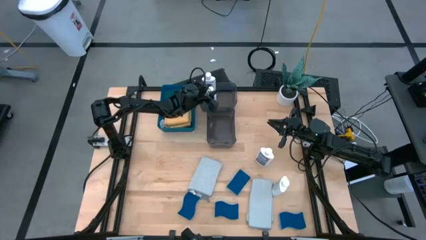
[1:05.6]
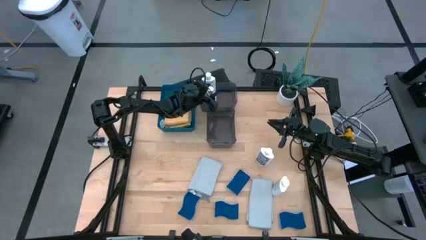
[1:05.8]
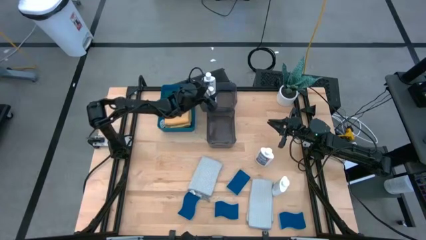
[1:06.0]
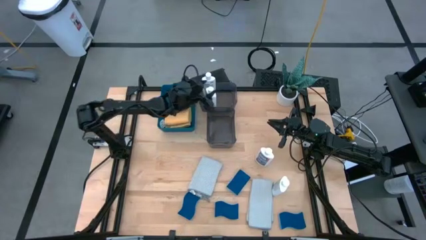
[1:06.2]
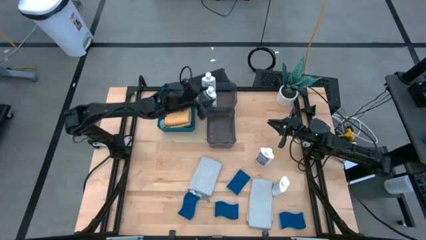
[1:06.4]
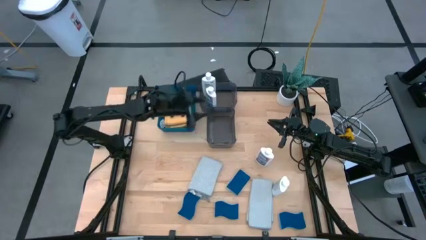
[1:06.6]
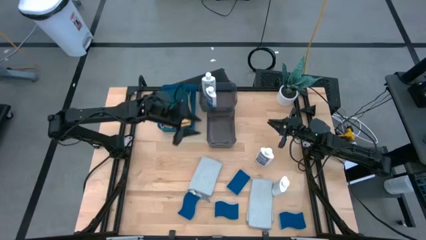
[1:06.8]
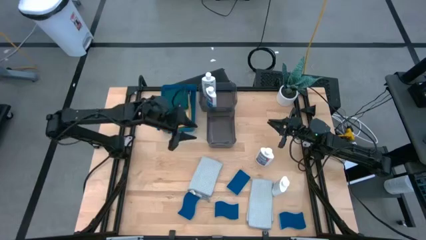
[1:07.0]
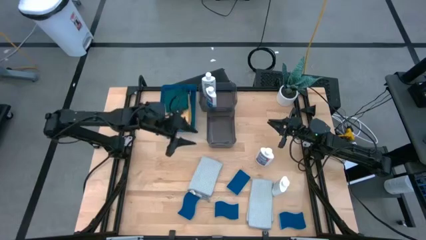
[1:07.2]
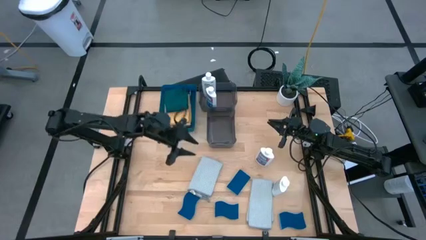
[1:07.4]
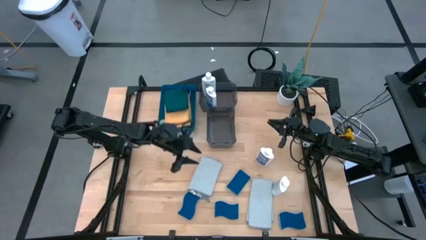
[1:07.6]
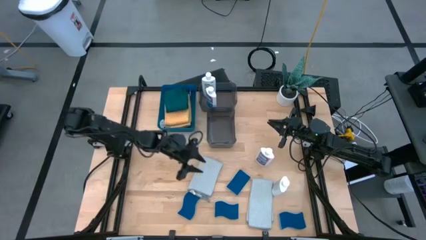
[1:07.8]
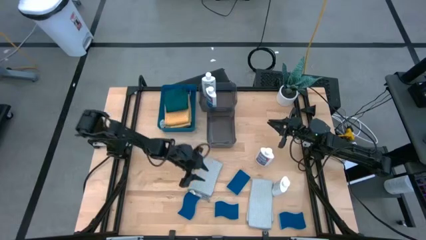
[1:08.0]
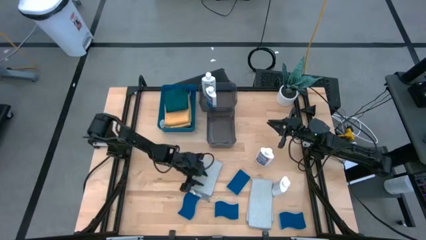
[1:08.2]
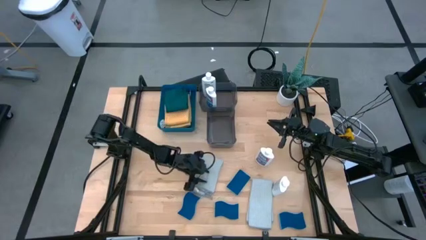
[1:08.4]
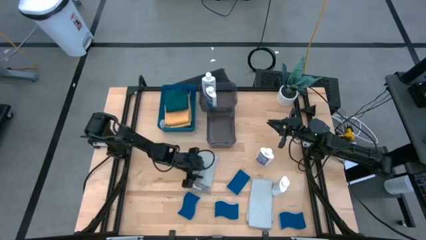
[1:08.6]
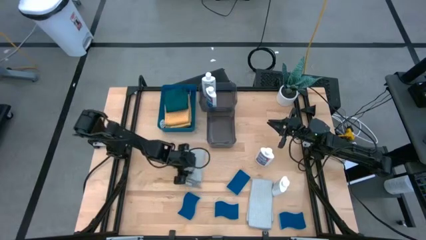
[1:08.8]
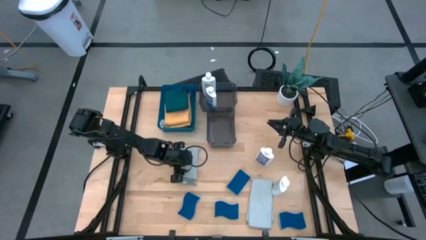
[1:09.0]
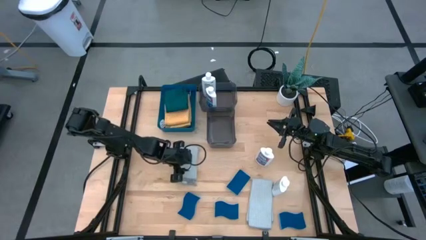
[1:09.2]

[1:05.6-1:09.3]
Task: Pick & Place Kitchen Items
Adjust the left gray microfiber towel on the table

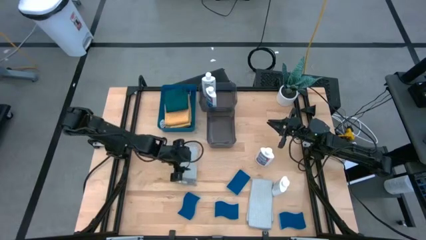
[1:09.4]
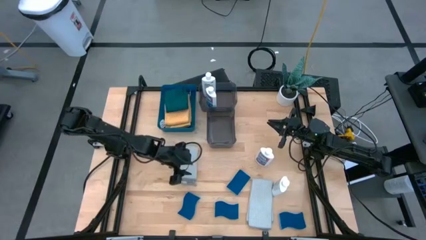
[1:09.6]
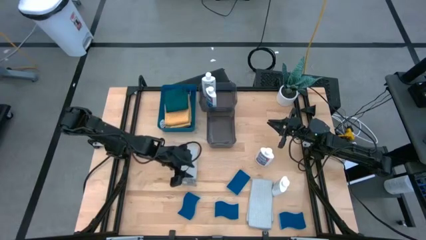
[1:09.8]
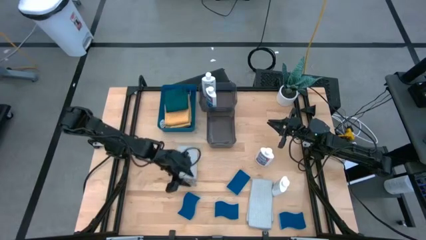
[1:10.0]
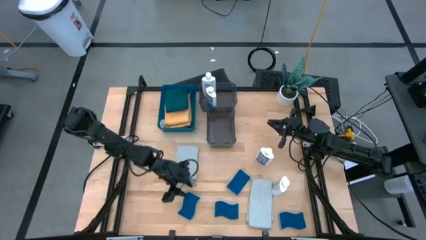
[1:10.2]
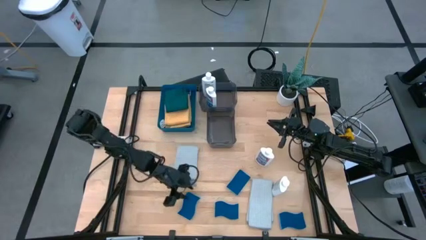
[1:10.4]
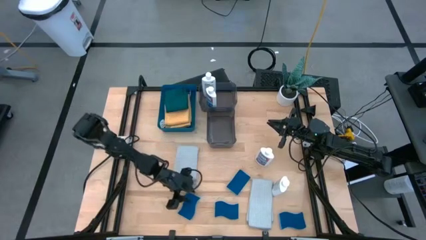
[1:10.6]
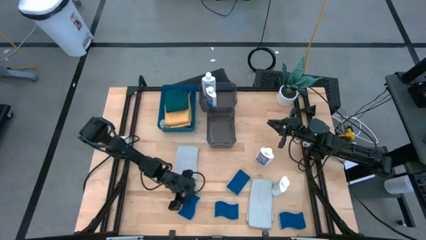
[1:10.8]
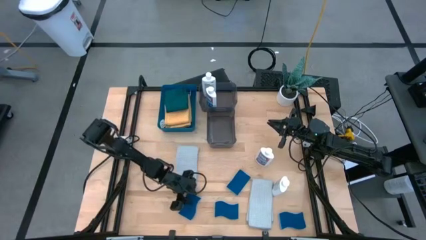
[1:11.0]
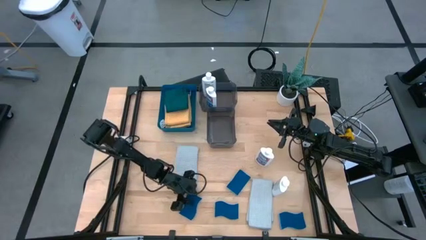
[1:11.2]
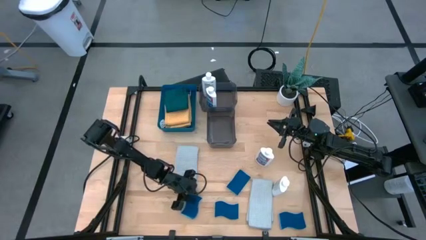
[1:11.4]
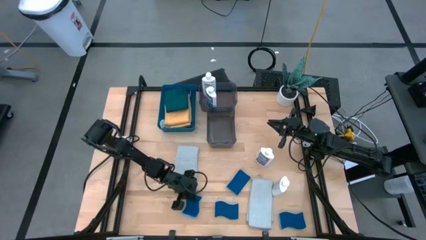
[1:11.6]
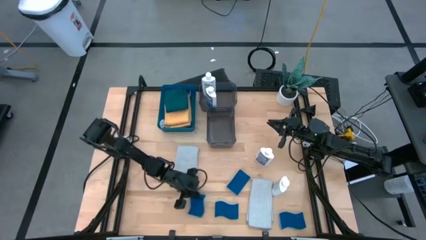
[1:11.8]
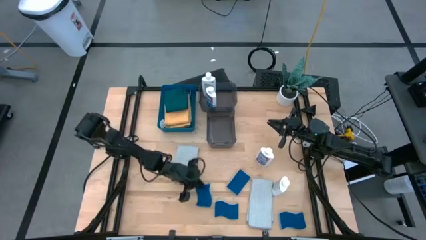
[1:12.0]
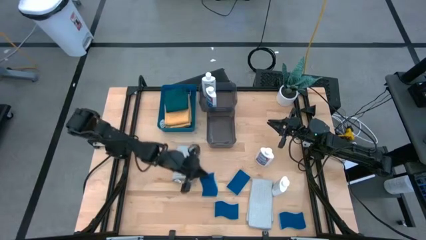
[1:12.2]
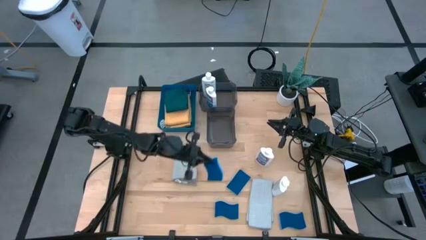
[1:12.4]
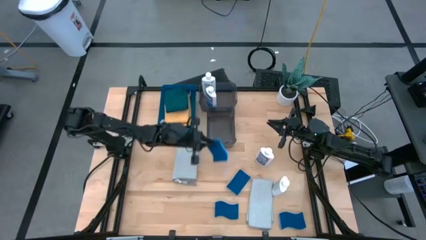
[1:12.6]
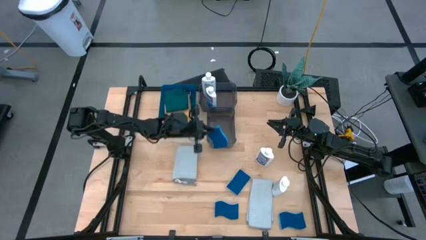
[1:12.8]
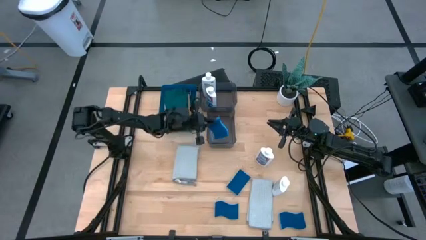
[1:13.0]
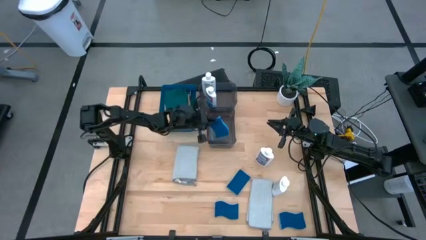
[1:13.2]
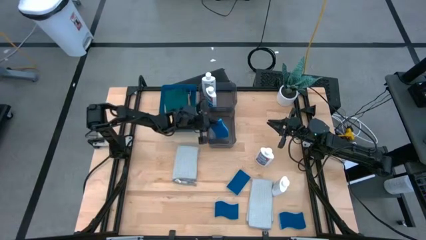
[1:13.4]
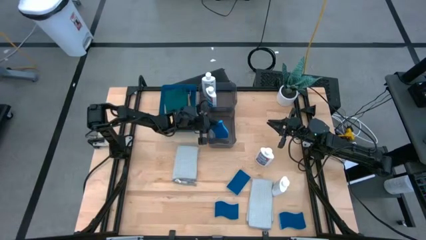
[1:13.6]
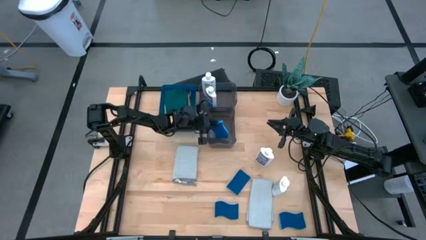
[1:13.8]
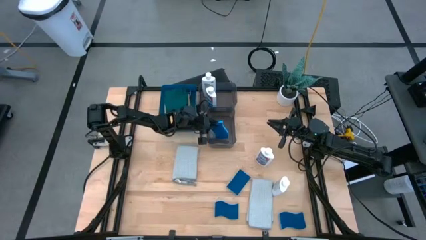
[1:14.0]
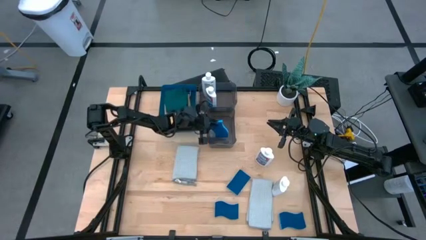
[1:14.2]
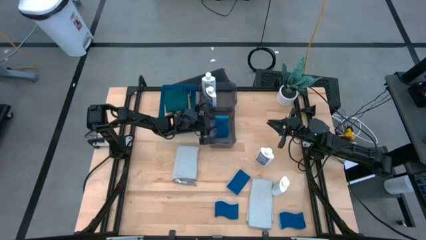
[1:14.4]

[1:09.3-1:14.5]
Put the blue sponge into the bottom black bin

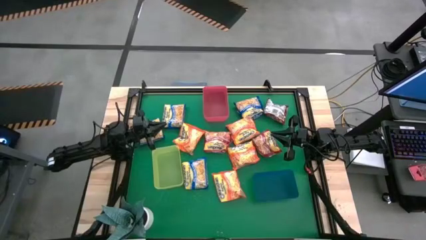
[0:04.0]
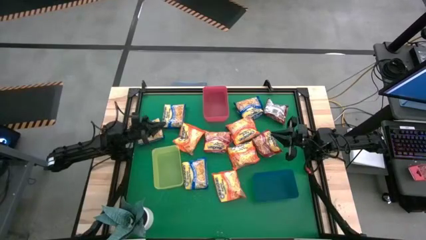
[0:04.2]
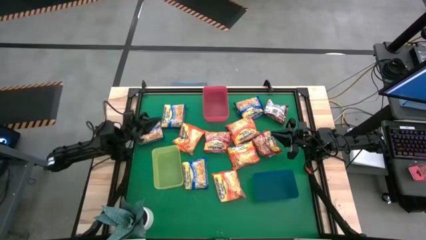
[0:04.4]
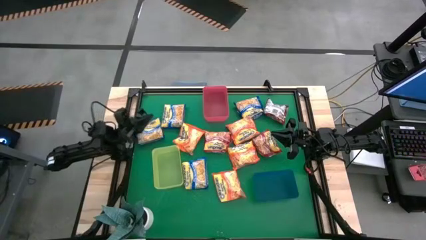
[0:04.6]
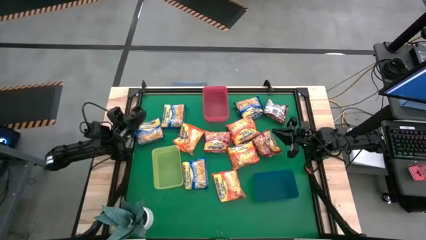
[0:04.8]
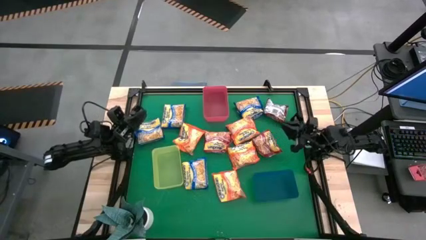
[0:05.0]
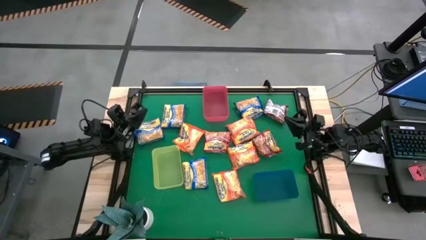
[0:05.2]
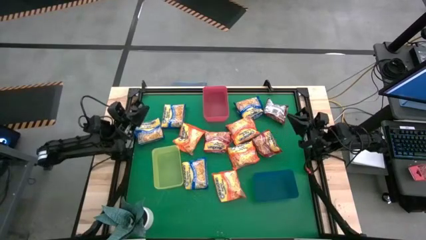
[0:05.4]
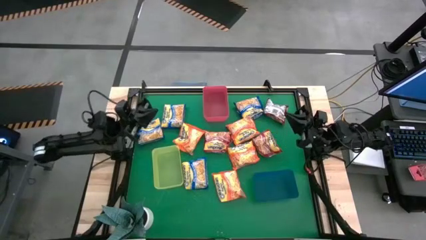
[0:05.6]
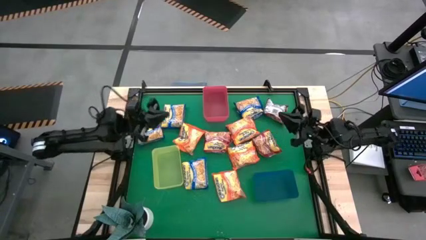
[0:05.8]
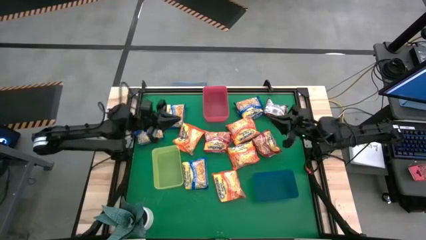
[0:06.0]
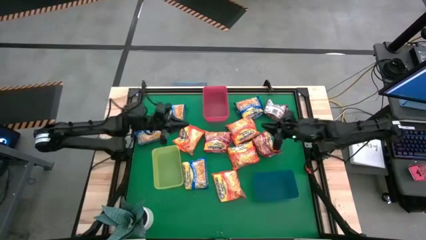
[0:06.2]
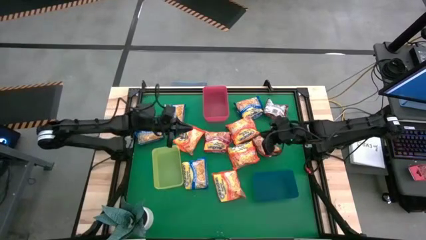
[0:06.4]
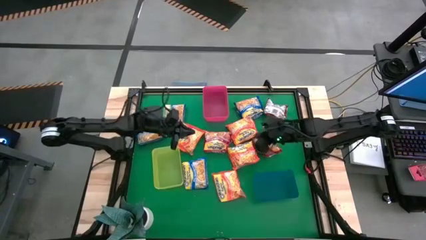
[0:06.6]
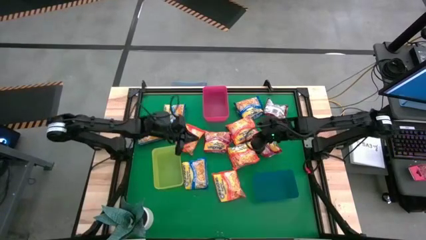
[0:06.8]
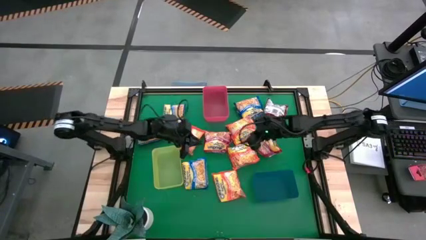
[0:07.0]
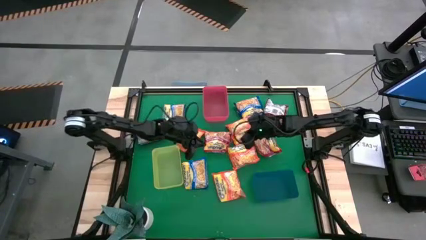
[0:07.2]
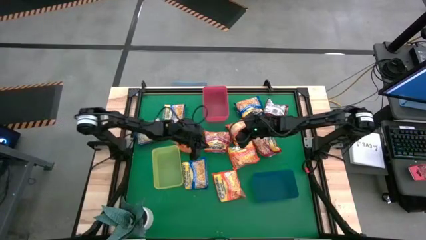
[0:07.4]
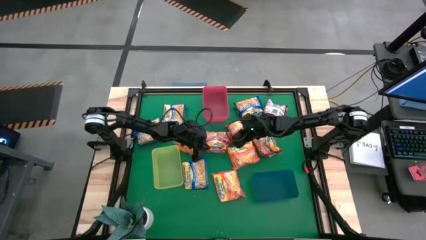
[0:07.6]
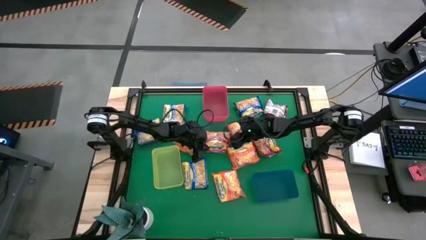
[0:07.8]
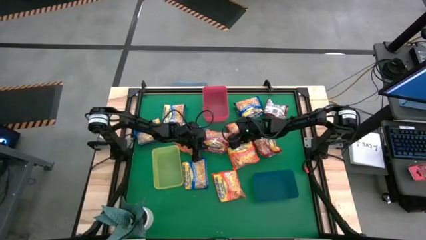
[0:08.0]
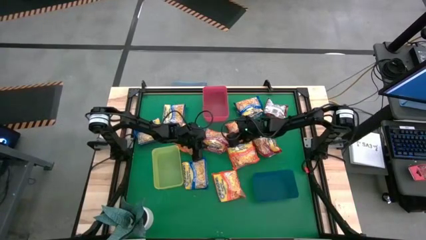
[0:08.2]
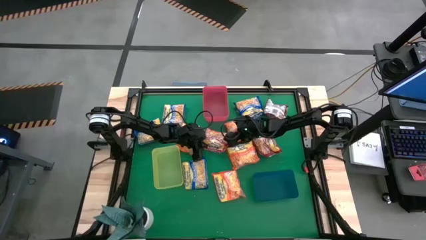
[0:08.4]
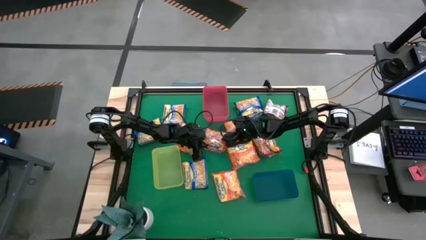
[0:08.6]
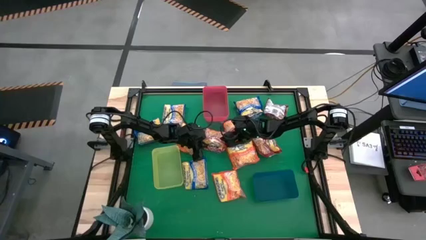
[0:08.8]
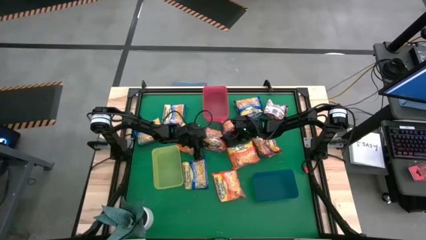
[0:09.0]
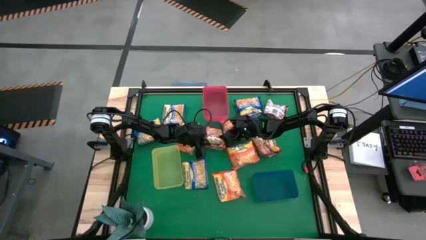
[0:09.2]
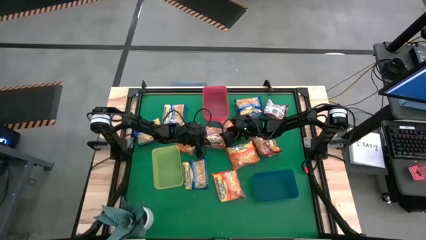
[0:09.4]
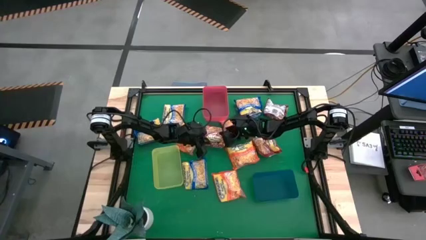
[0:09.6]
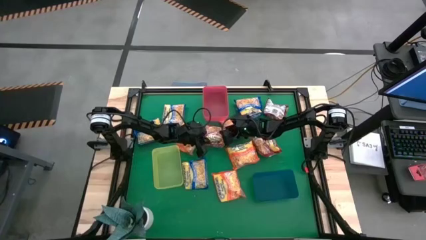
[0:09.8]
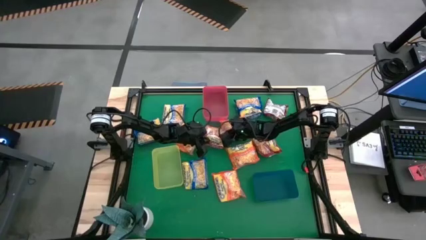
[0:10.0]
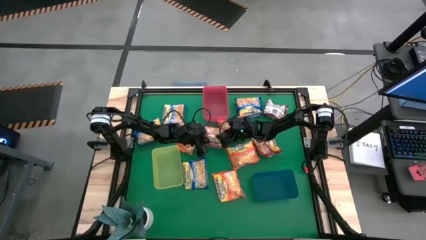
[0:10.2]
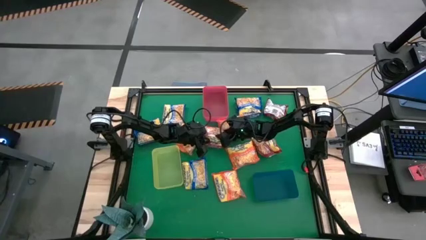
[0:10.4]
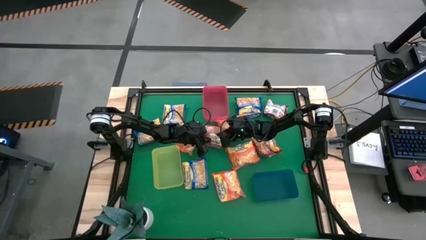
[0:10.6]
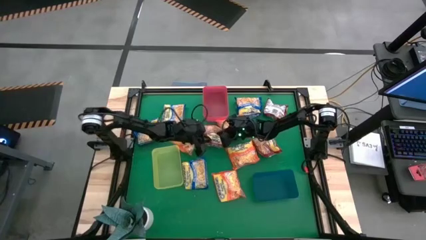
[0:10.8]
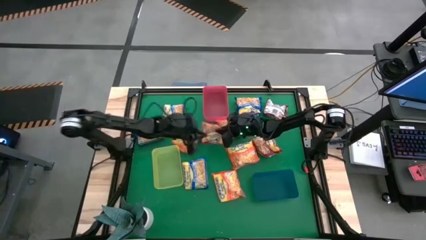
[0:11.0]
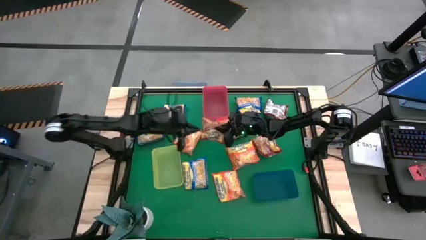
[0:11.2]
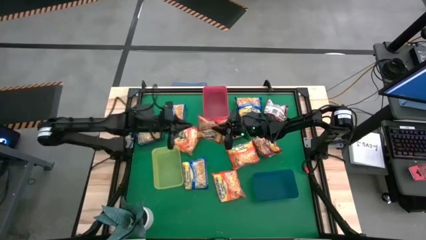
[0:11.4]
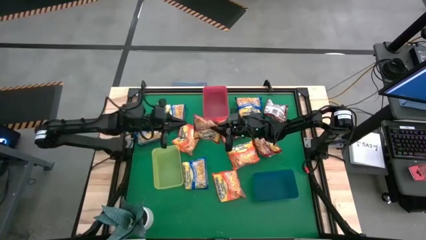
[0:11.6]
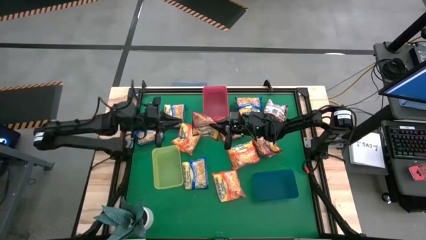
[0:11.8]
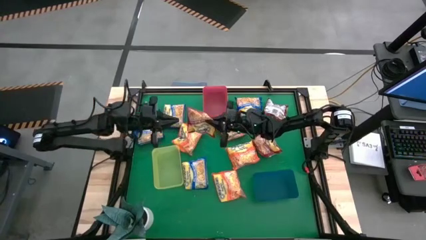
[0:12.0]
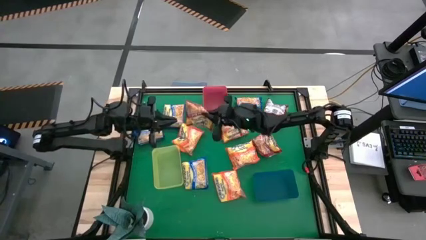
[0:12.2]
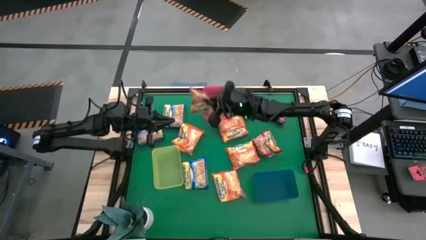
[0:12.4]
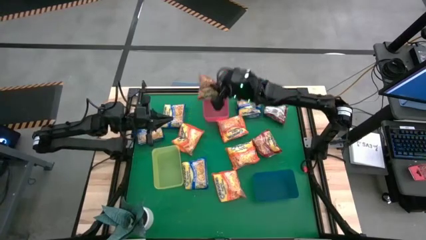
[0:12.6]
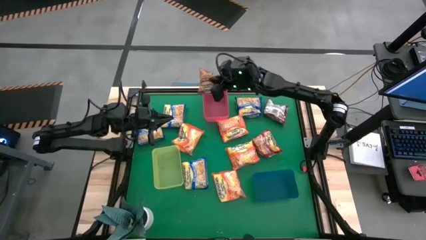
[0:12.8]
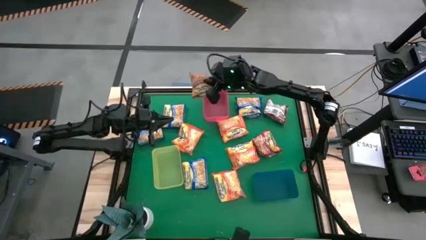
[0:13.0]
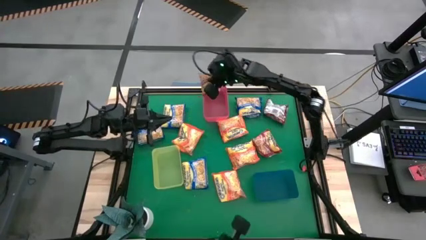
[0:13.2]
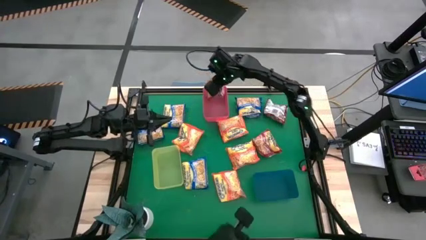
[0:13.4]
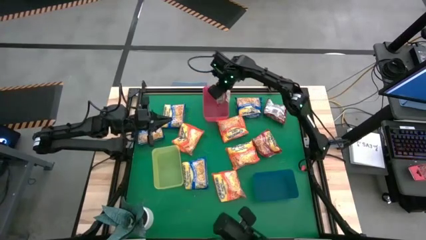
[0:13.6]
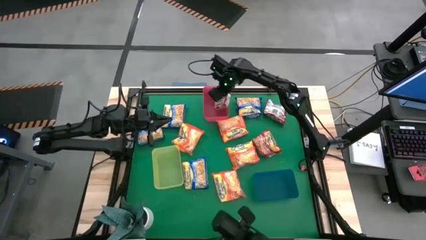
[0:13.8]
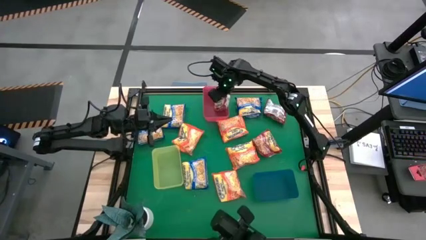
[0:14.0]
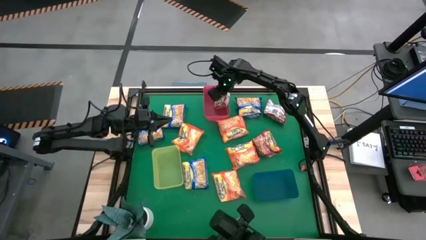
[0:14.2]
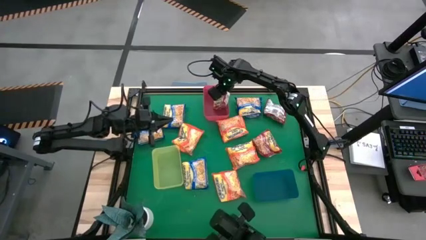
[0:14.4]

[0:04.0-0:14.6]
Task: Sort Maruchan noodles
Put the red noodle pack into the red bin
